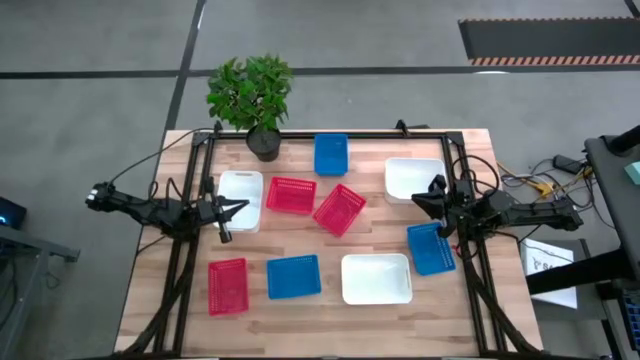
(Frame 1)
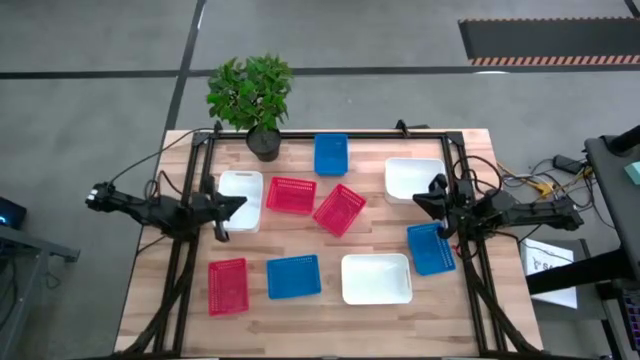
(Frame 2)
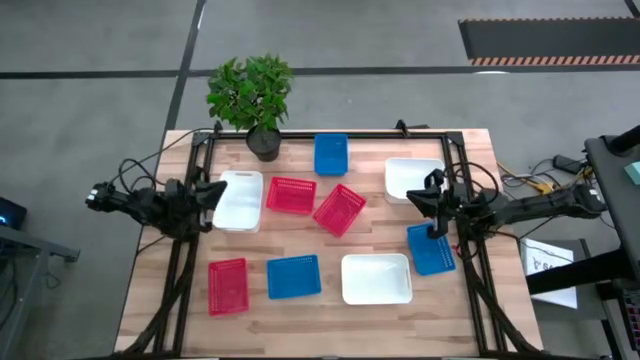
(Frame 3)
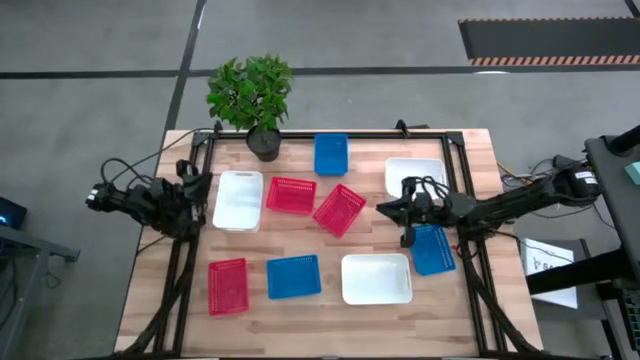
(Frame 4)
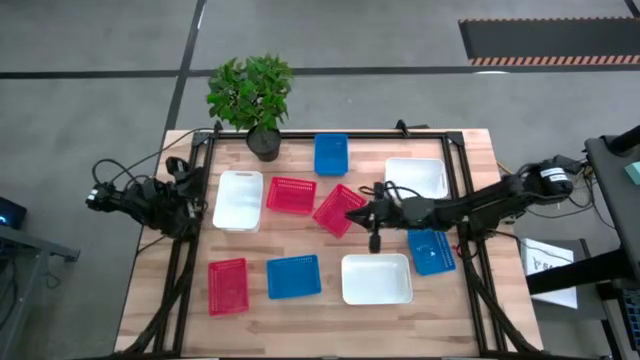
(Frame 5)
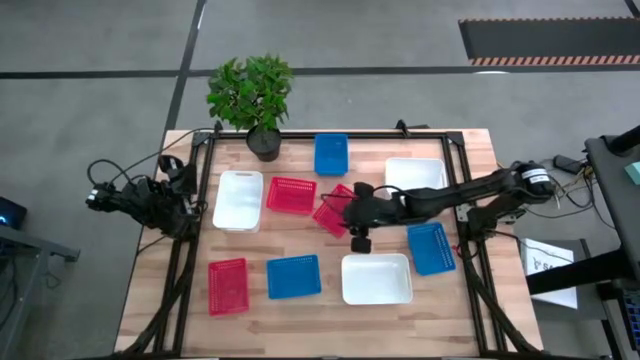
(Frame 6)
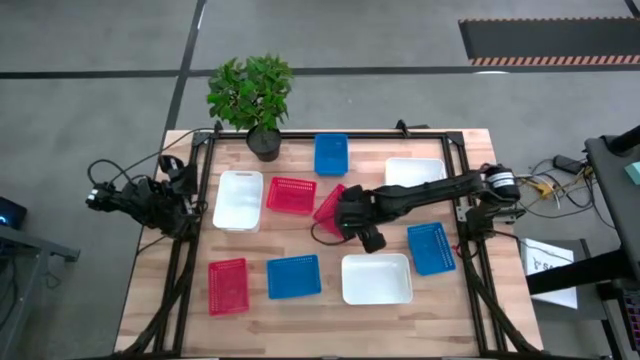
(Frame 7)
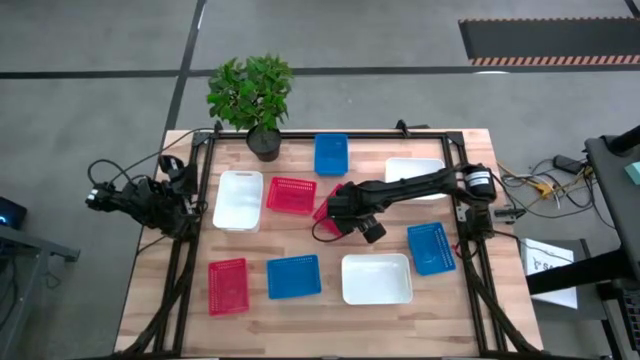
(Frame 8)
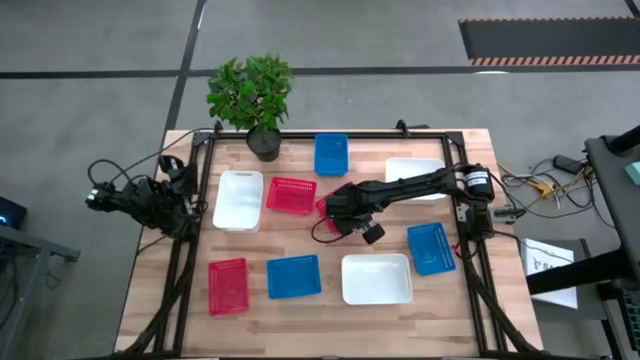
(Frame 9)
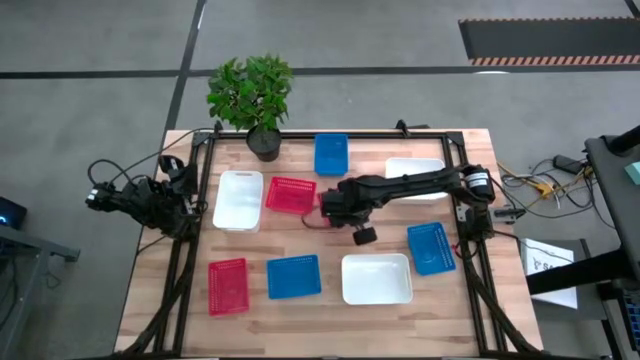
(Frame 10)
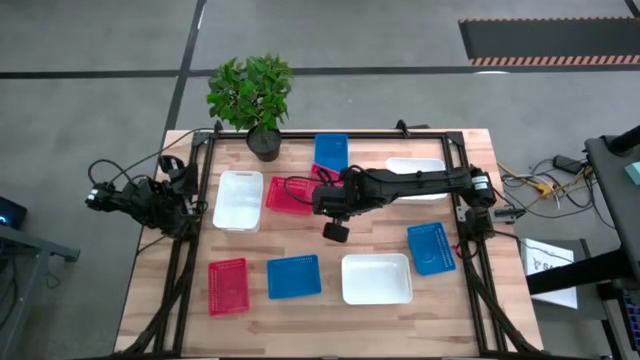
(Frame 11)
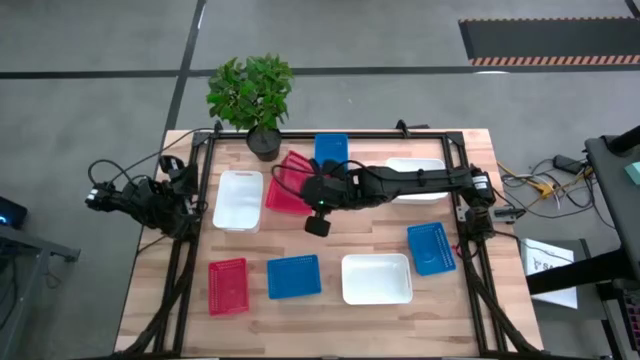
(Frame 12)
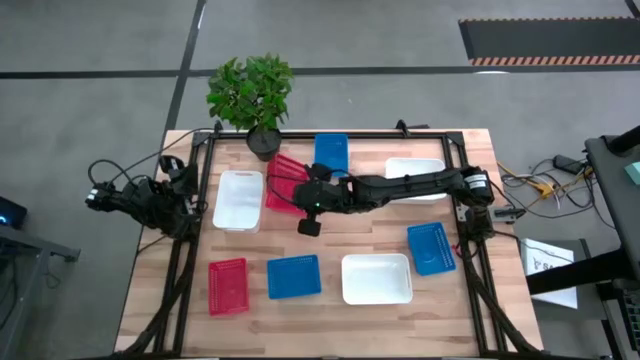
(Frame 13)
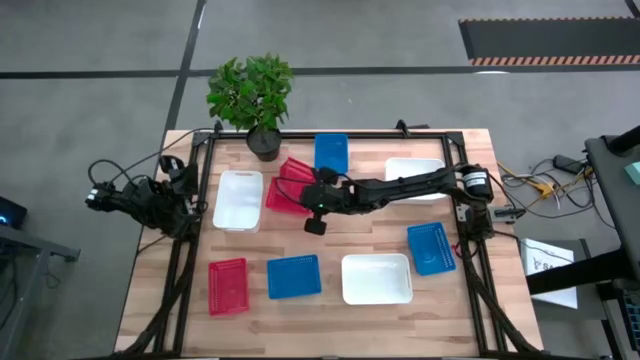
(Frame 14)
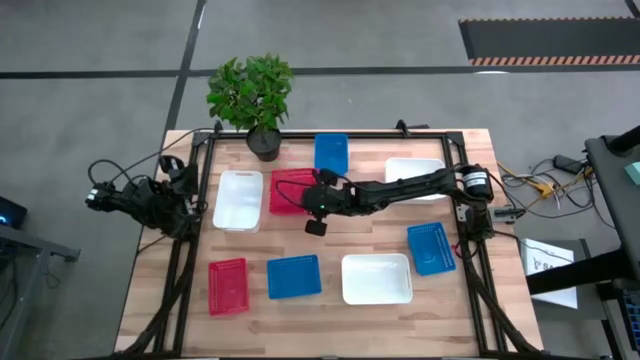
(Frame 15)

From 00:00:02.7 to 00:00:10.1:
Stack the top right red bin on the top left red bin

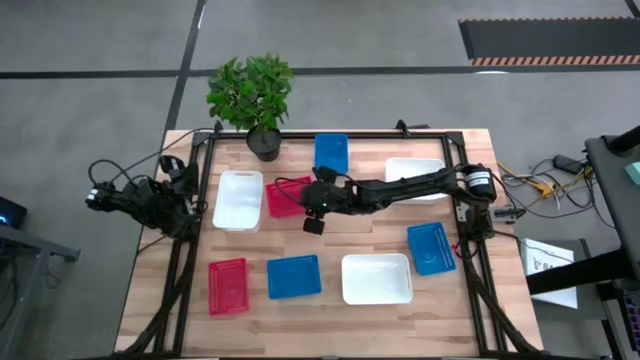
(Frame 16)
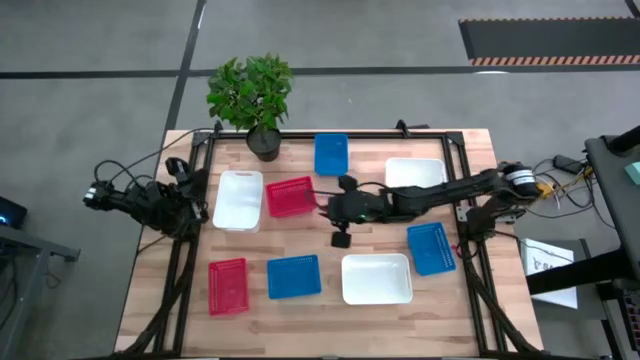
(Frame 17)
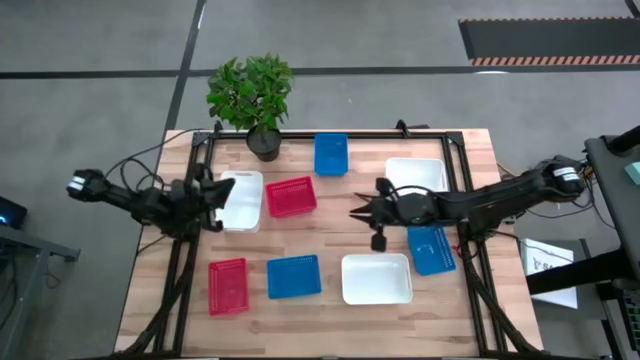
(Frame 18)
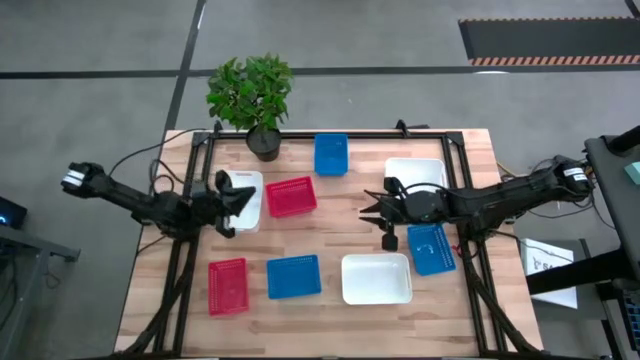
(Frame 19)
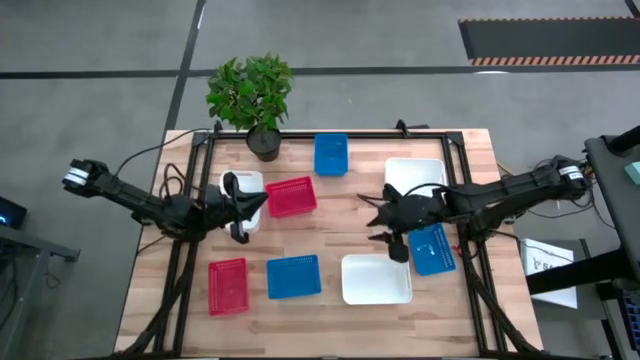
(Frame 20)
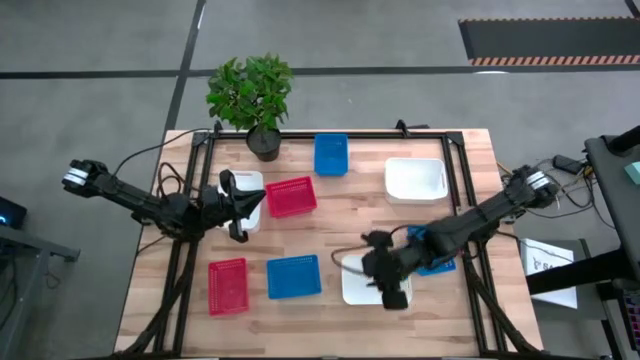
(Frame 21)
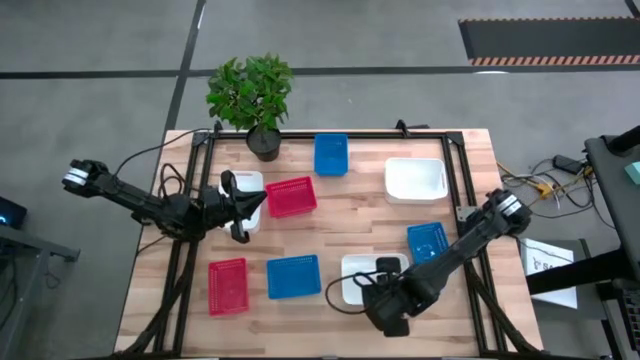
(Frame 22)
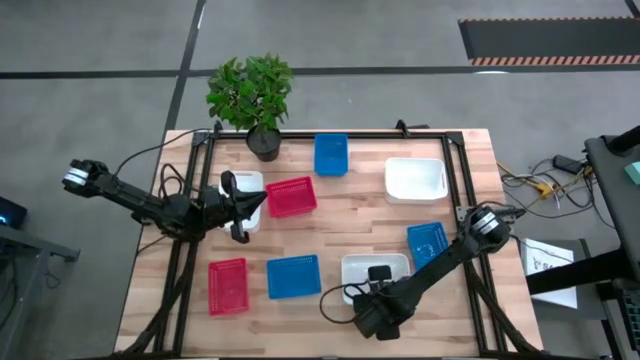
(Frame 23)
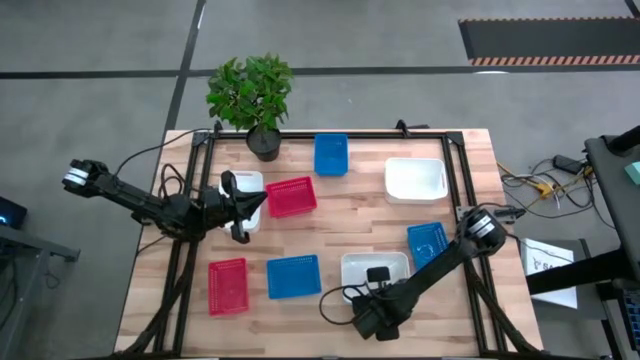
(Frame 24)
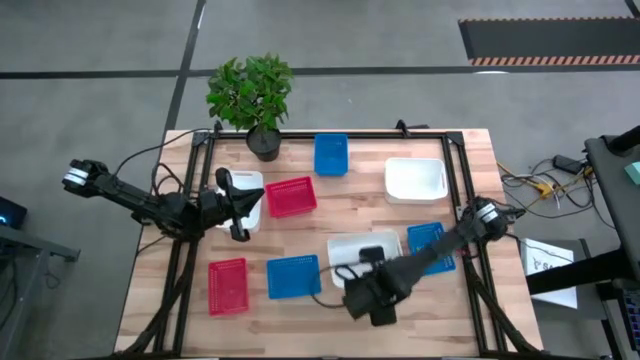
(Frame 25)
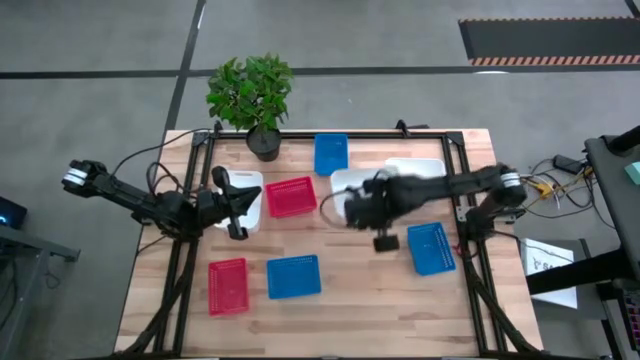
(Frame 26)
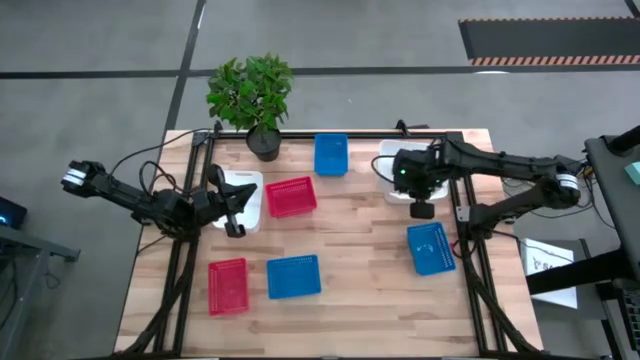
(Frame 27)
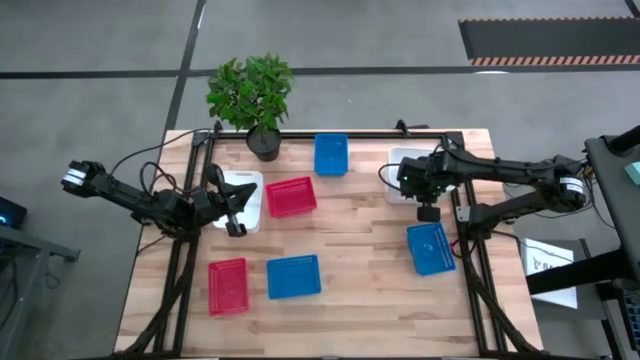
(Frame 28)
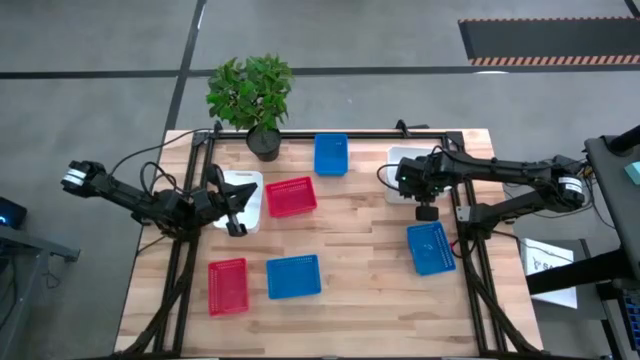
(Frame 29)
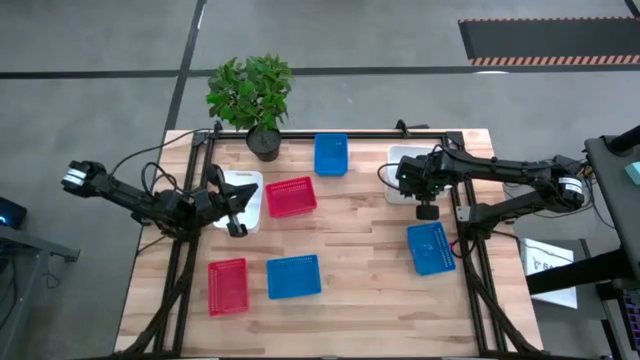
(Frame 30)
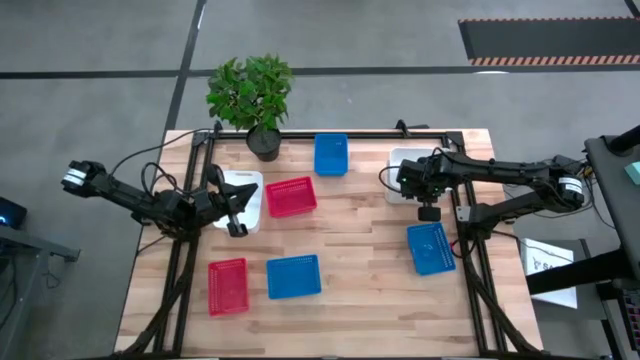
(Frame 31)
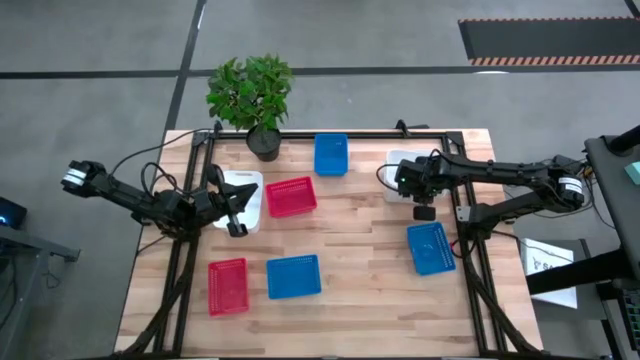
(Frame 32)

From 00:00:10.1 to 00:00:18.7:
Stack the bottom white bin on the top right bin
